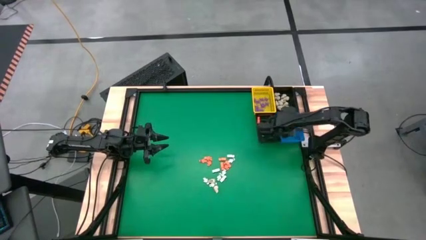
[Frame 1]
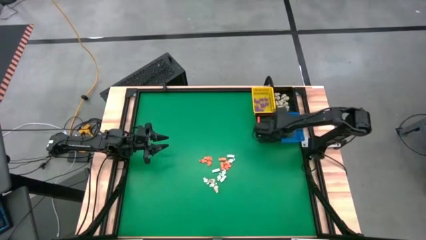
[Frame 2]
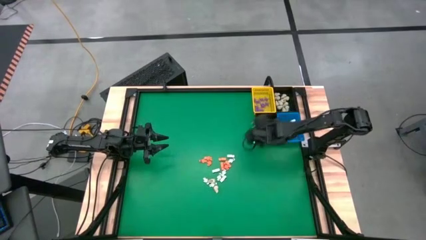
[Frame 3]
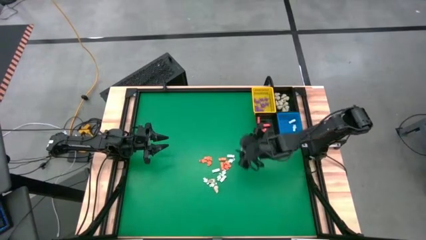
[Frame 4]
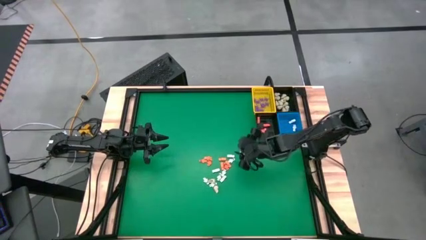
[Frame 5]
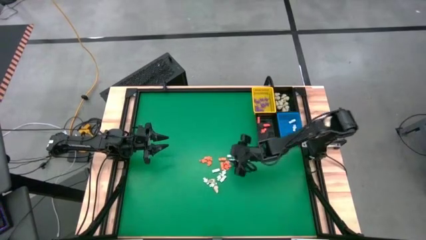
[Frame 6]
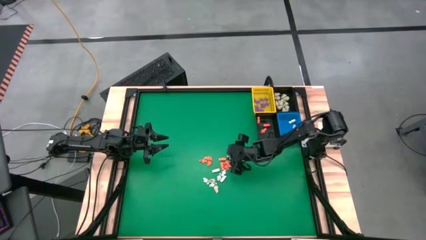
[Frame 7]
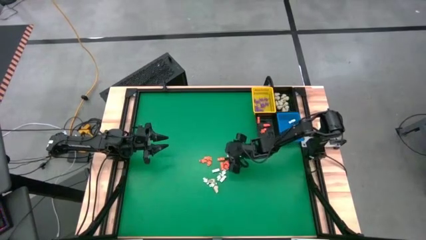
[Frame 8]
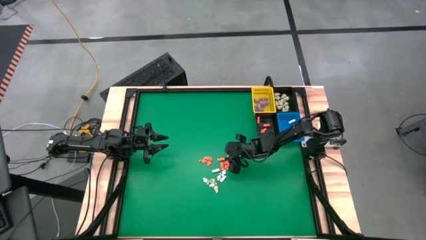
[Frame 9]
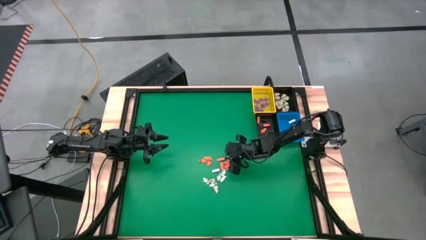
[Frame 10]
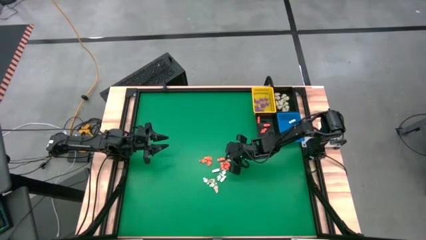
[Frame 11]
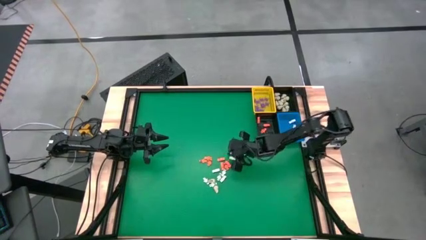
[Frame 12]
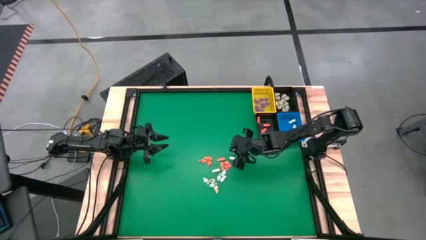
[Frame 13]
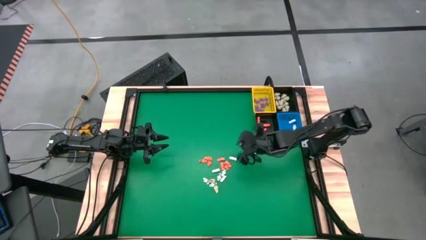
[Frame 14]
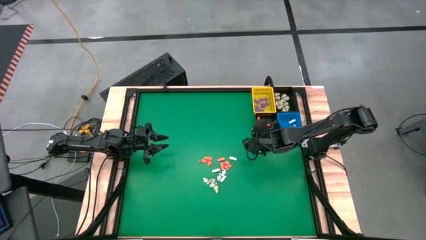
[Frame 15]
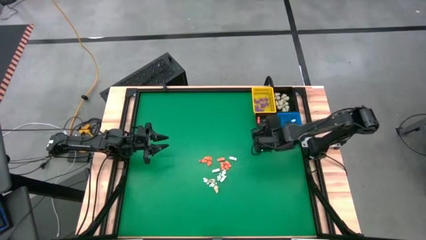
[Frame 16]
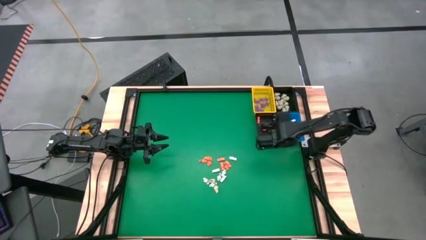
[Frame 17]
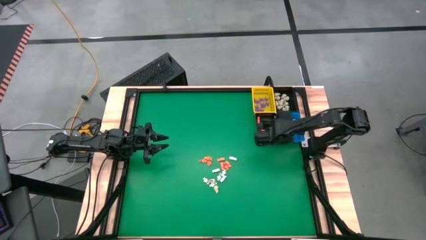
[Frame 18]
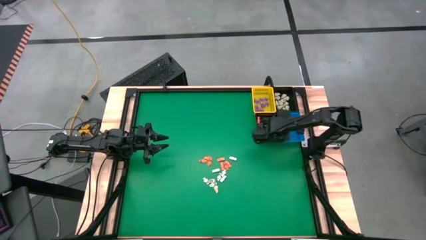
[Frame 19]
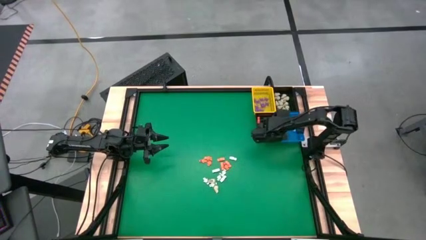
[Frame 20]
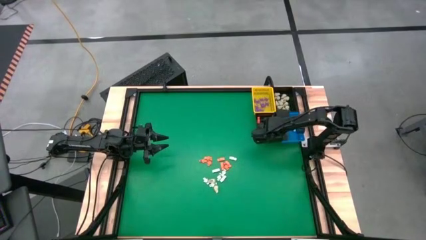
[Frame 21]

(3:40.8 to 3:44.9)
Task: Sort Halloween decoration
Put the white skeleton toy into the blue basket

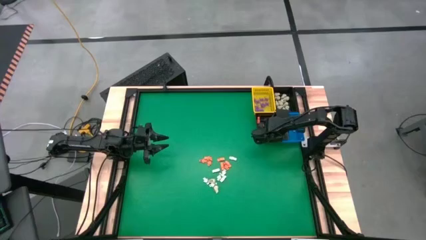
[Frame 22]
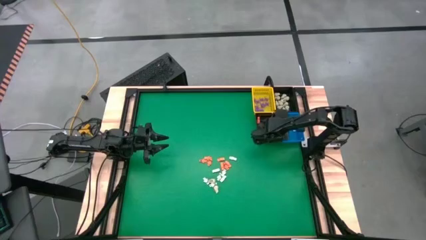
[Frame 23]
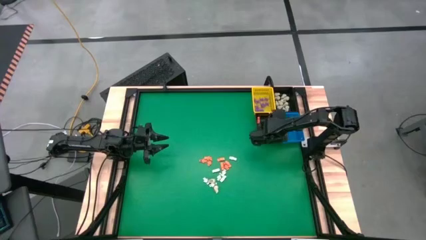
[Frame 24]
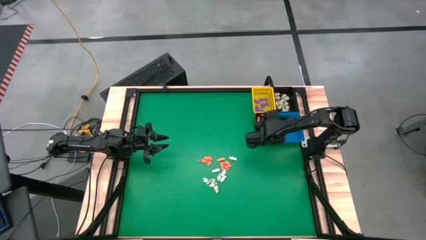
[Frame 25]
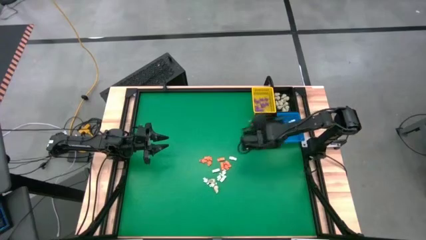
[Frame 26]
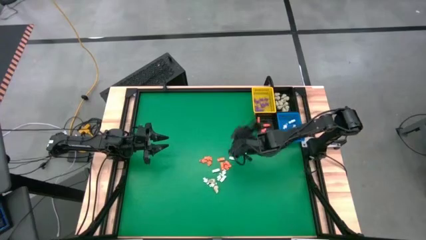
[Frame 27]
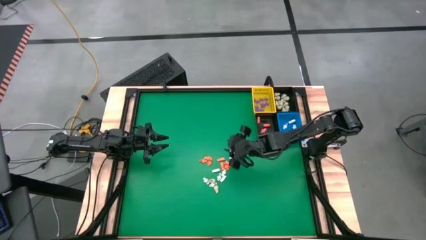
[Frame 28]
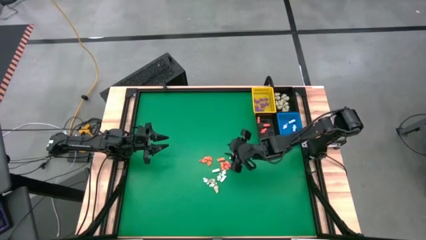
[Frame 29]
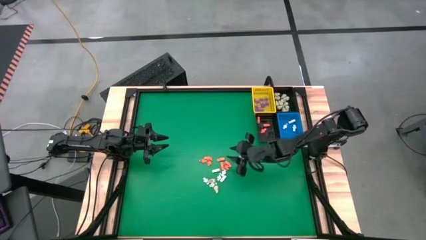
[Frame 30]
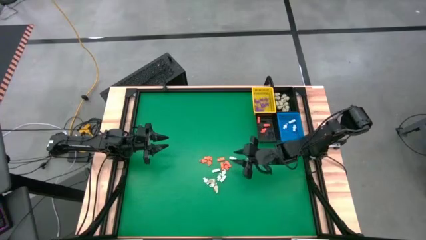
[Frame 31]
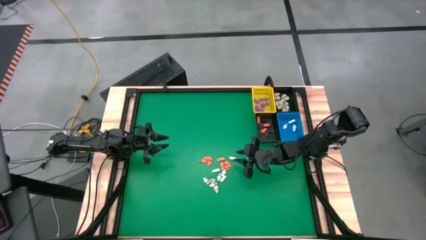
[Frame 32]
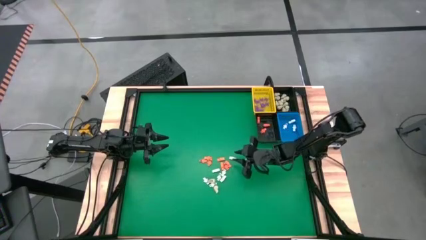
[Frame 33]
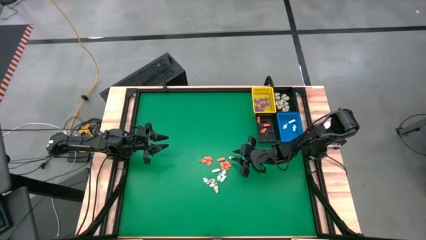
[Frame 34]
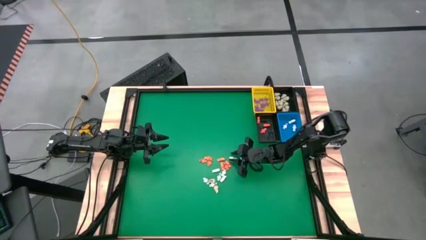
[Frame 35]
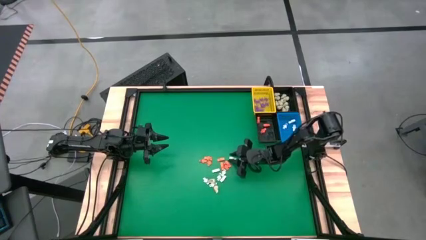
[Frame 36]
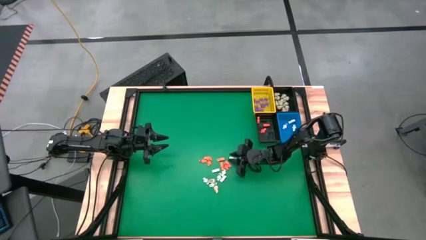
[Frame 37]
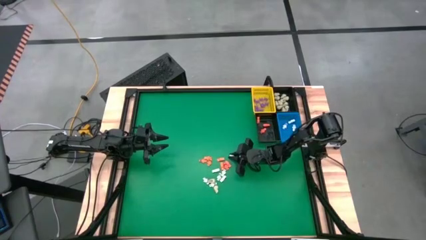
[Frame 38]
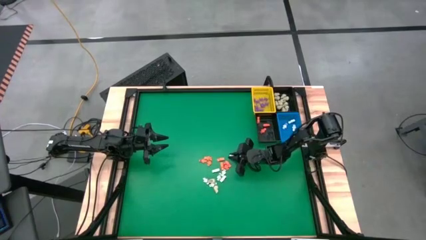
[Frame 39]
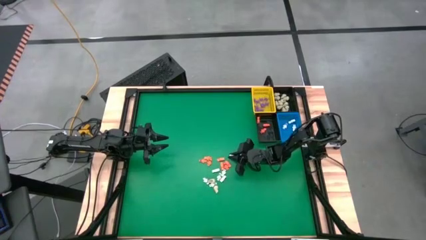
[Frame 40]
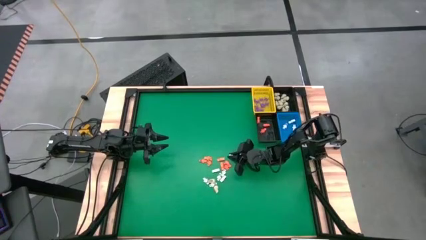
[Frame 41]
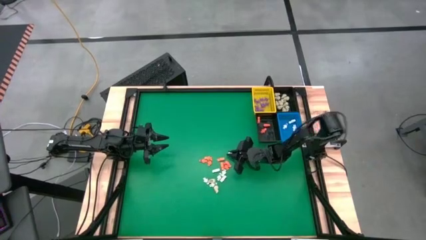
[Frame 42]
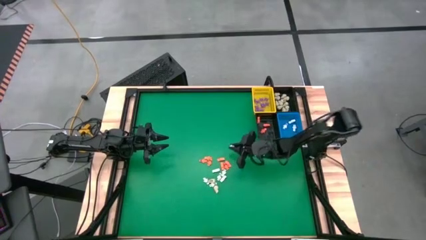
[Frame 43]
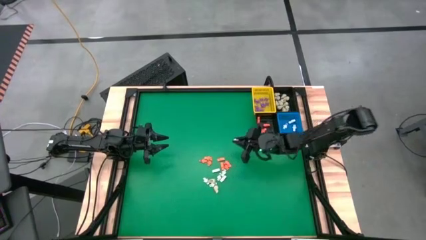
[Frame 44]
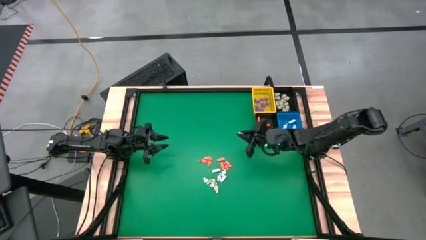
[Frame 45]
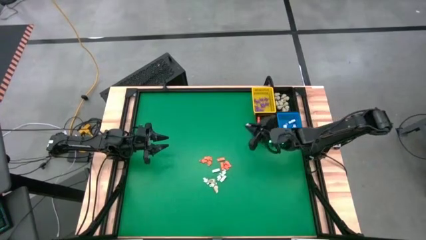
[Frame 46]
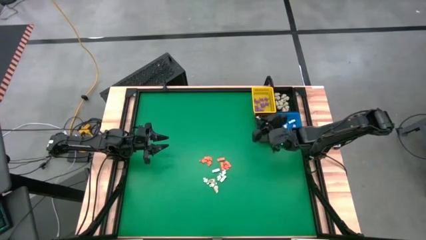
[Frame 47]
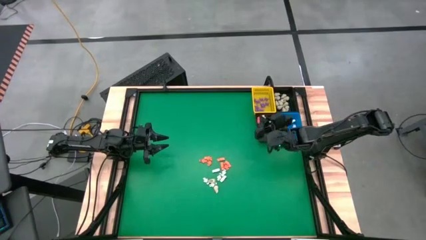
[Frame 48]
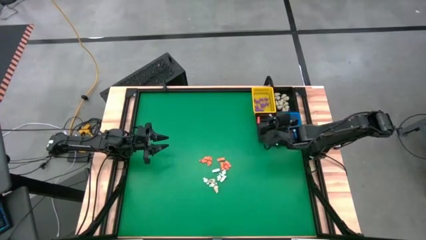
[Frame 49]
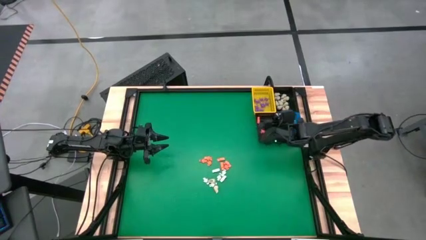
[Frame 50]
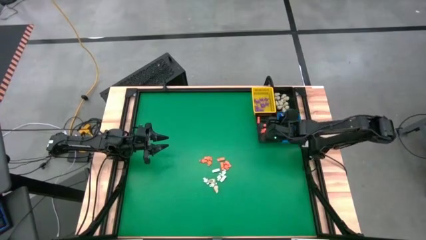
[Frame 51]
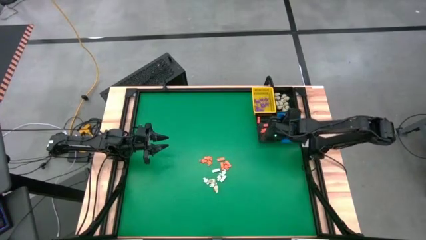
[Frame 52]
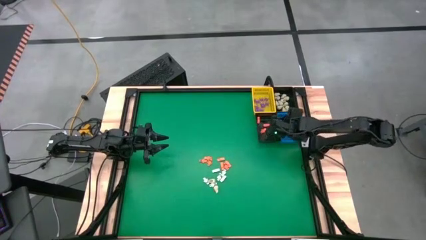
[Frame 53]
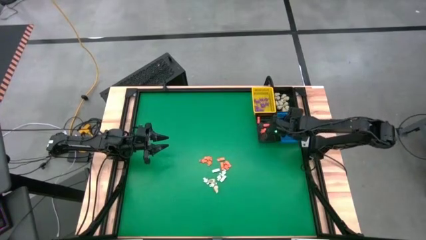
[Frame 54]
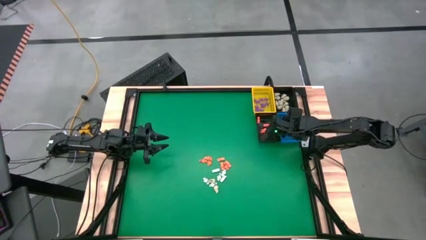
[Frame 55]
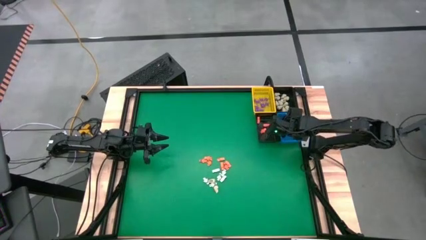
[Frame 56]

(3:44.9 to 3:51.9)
Put the white skeleton toy into the blue basket

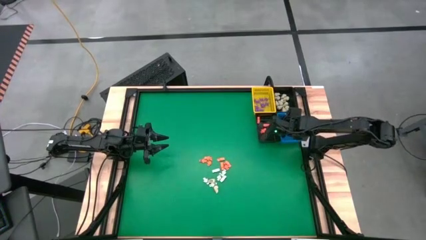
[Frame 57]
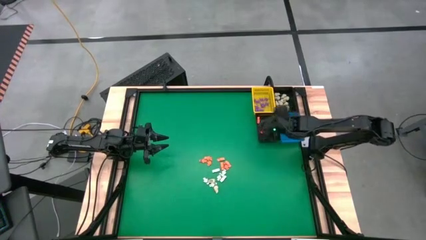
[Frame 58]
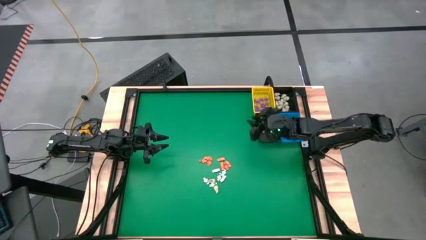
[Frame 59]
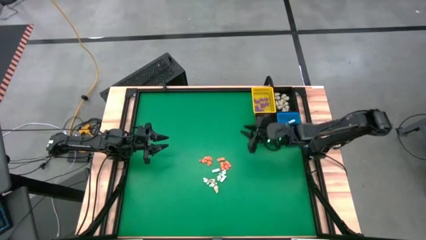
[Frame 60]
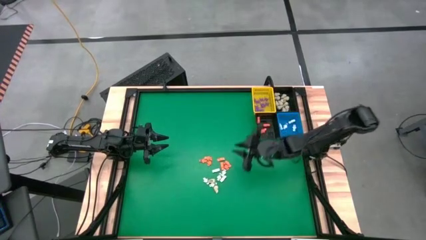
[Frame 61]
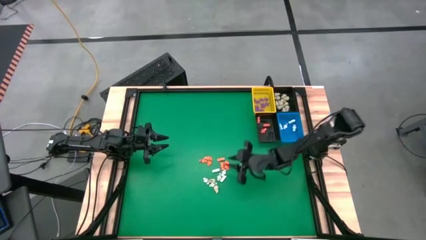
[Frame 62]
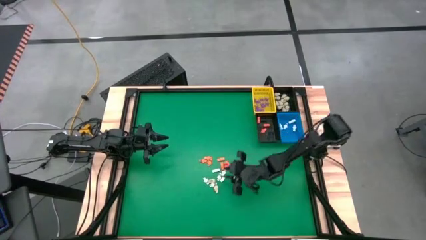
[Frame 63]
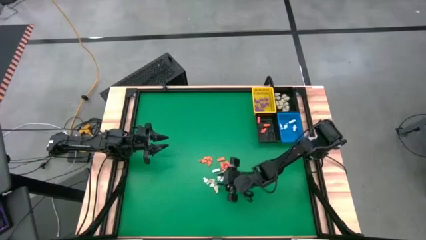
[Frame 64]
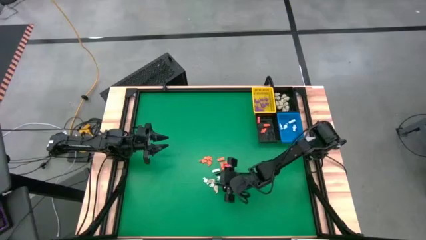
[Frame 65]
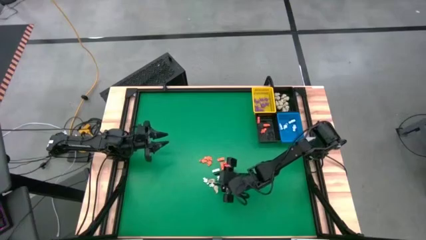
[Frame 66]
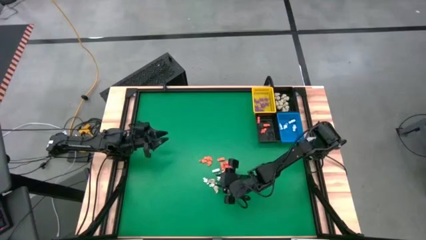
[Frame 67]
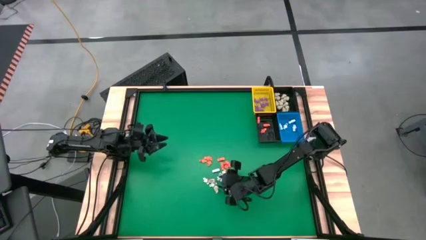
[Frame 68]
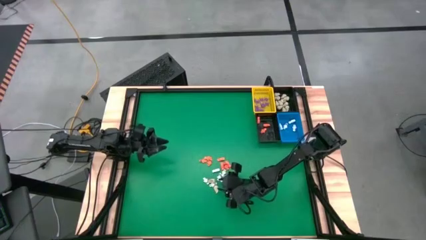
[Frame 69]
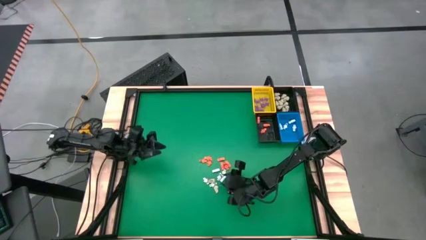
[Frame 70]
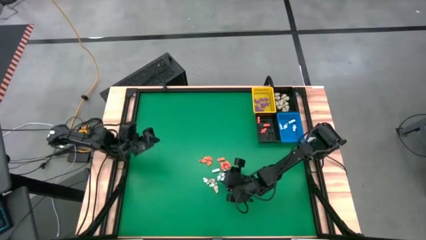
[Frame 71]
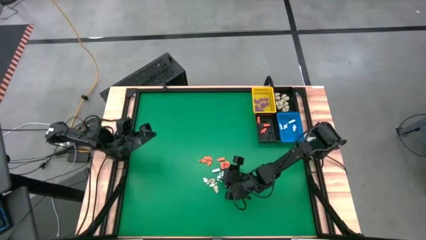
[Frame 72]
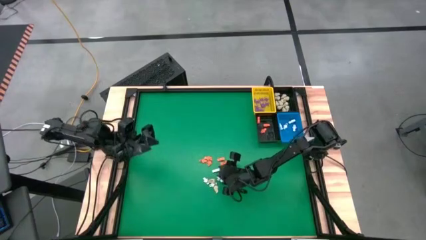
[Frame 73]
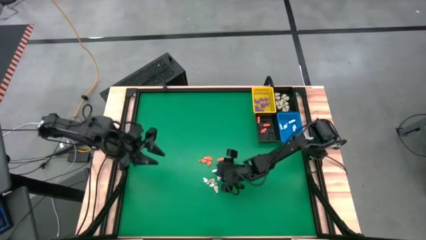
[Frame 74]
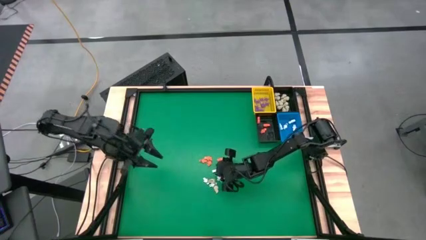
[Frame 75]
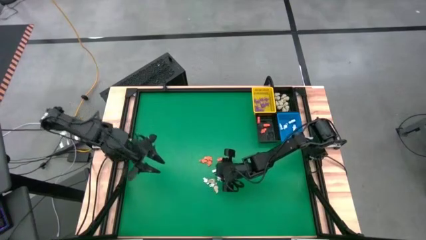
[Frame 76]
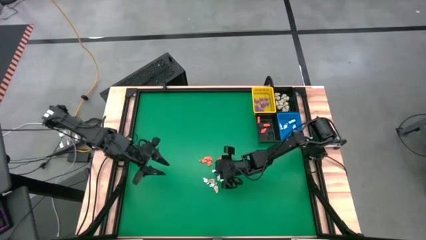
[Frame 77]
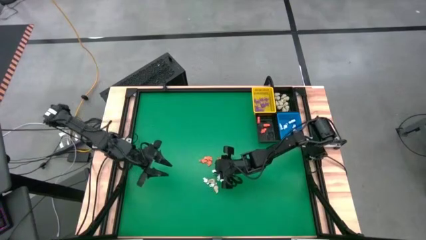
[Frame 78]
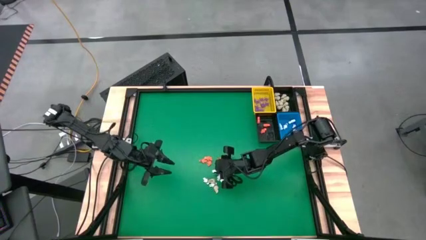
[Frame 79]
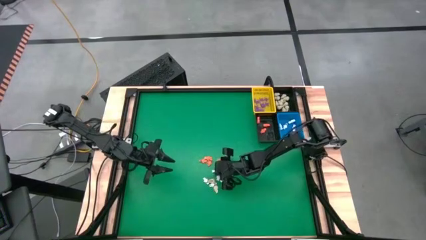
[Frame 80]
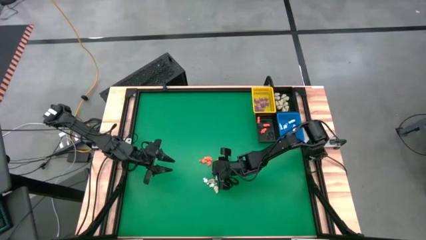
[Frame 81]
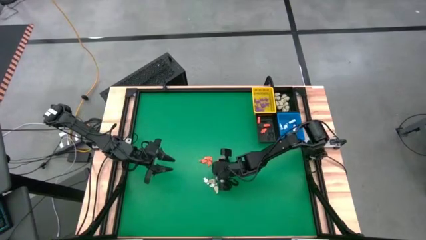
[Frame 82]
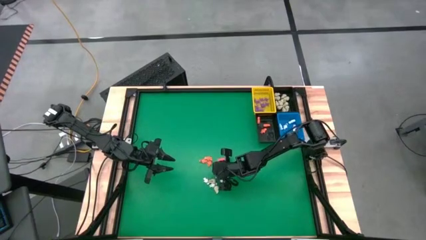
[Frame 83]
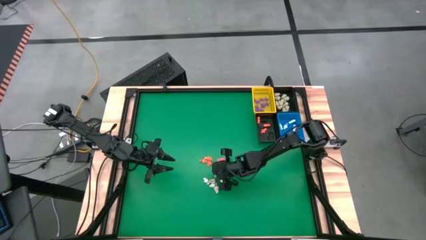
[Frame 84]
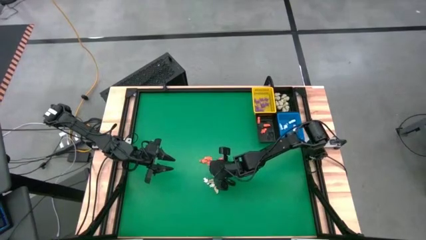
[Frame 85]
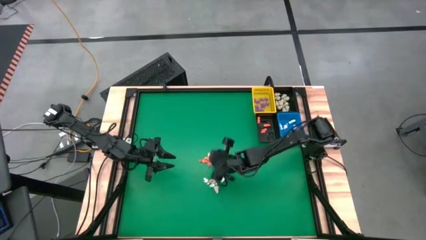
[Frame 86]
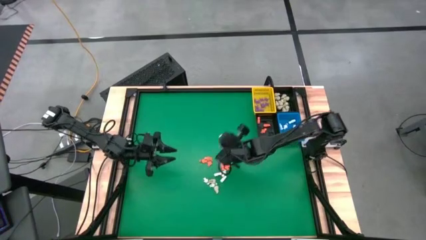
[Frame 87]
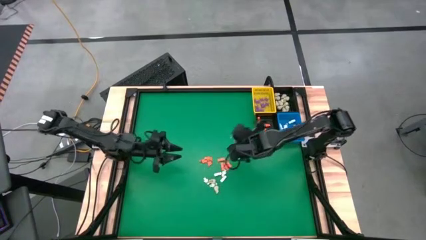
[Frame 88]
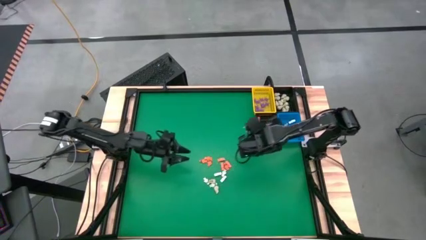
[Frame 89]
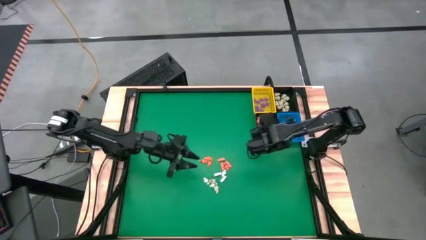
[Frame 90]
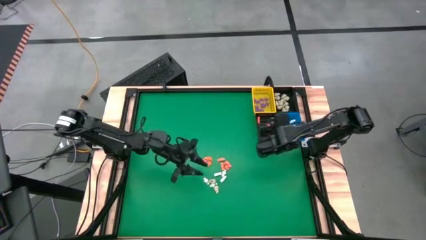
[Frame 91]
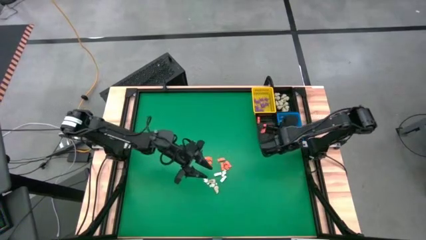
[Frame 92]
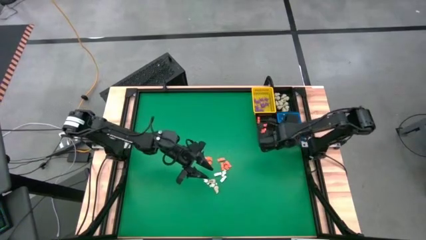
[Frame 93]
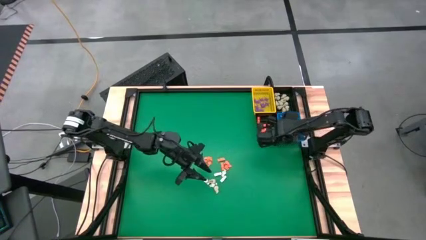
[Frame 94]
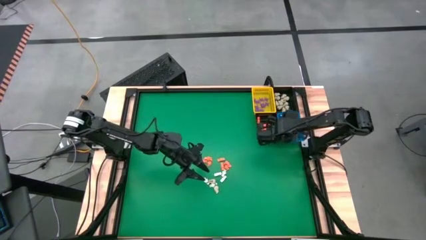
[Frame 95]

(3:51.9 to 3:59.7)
Put the white skeleton toy into the blue basket
